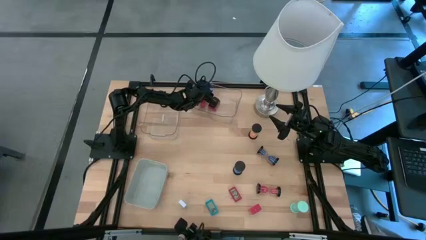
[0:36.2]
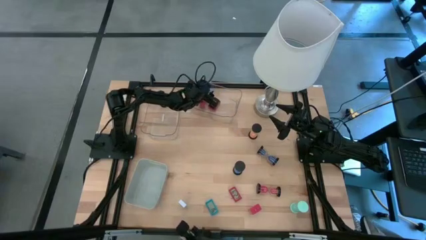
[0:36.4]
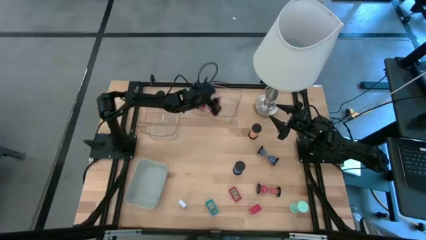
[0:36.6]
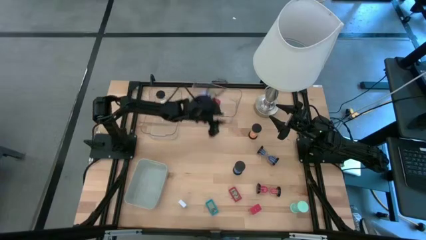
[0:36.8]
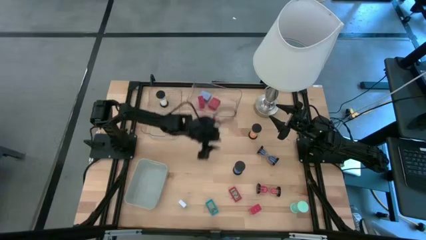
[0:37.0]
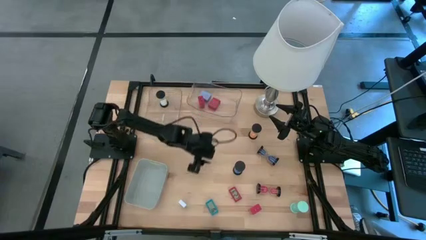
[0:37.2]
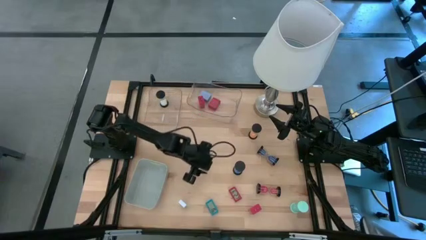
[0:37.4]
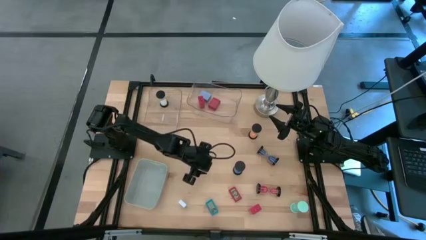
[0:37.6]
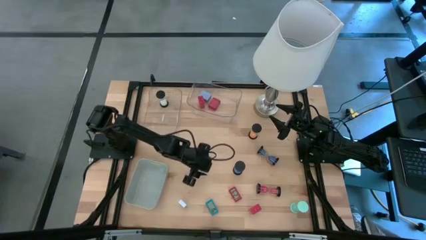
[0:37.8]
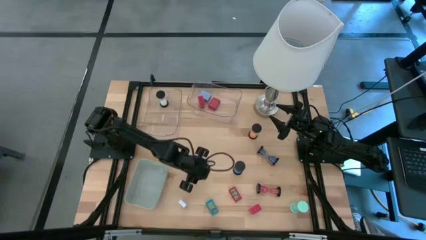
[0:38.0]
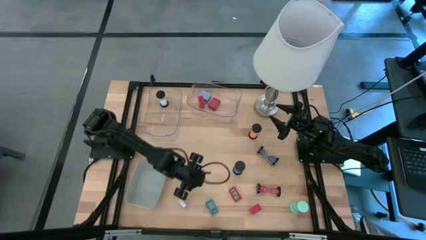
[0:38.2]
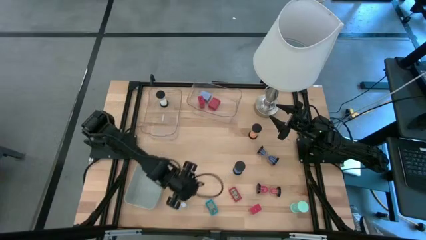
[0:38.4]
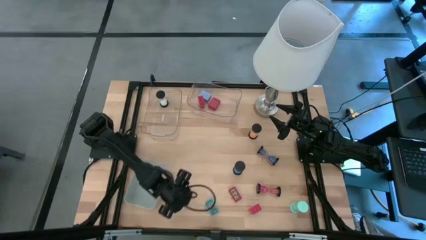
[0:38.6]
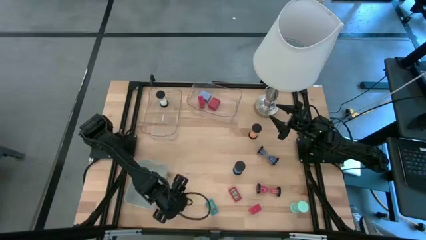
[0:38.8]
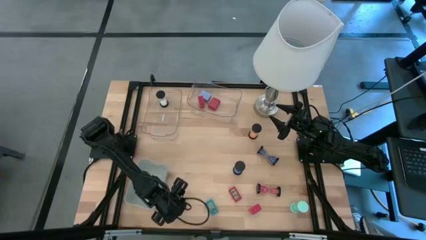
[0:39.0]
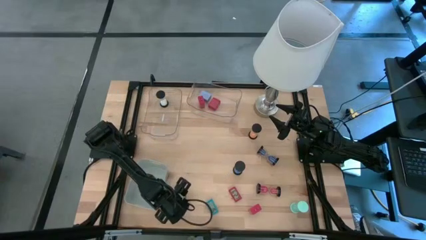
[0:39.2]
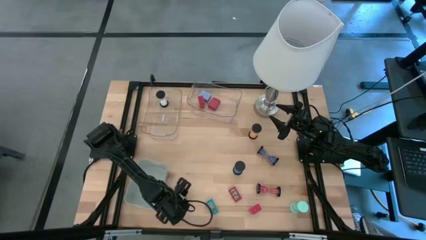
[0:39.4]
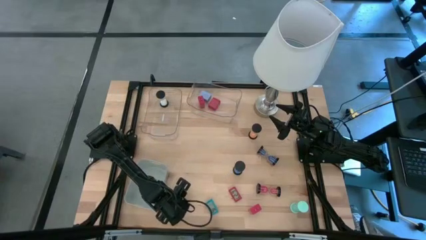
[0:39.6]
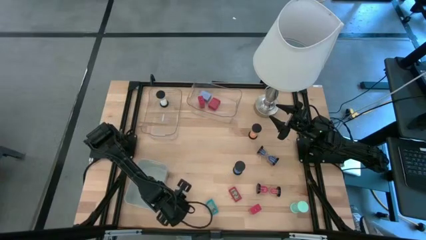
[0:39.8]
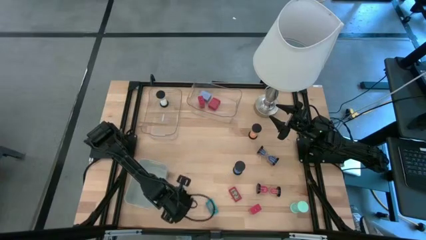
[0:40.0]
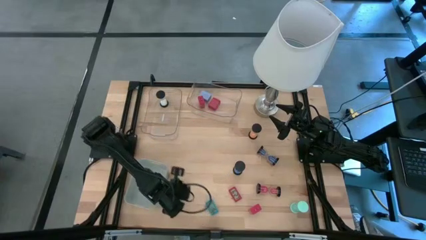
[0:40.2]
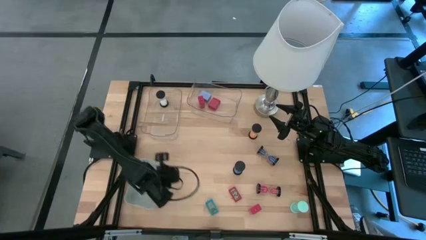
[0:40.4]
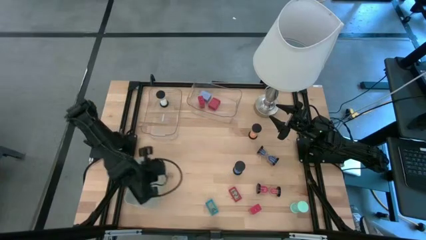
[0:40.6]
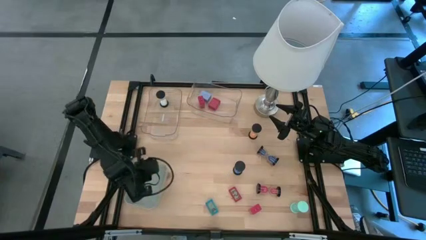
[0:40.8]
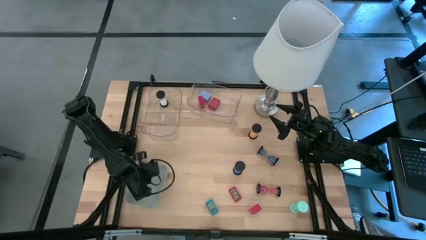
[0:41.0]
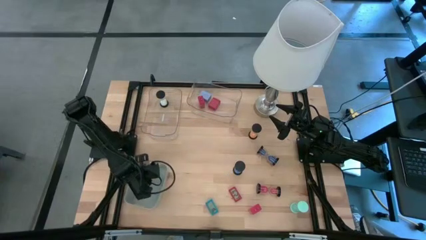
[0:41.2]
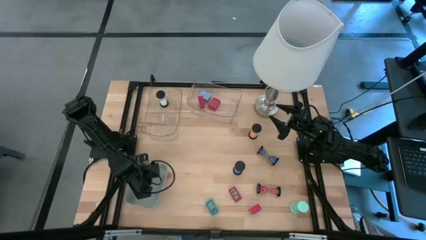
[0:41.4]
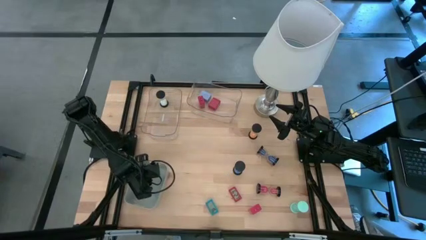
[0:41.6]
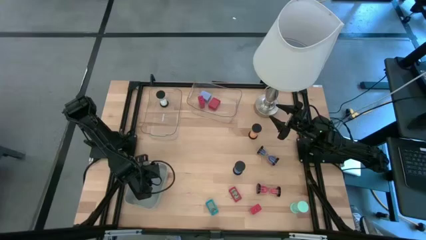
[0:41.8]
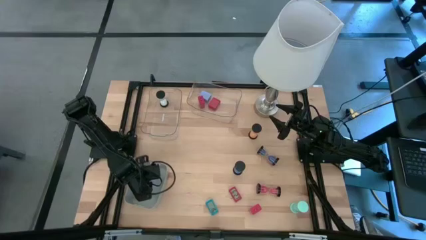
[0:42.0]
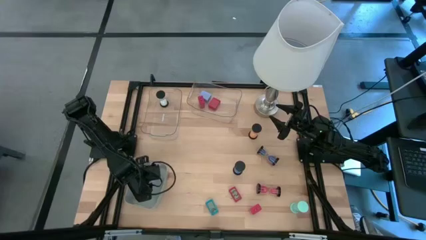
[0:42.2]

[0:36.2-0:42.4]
Task: Pick & Place Office items
Put the white digital clock timer into the gray bin

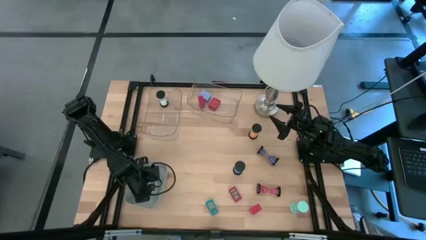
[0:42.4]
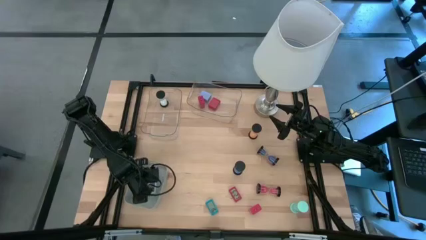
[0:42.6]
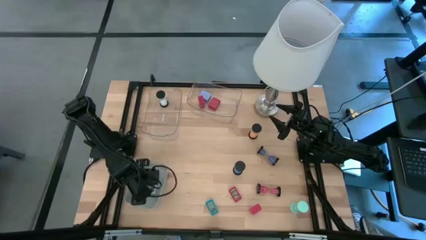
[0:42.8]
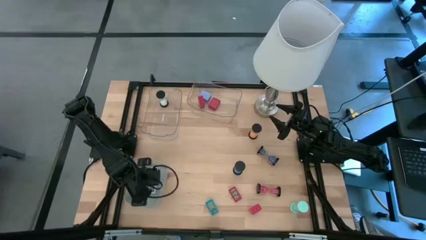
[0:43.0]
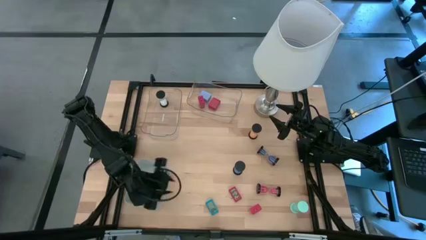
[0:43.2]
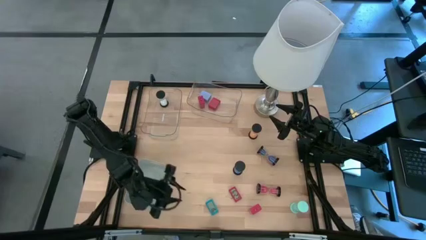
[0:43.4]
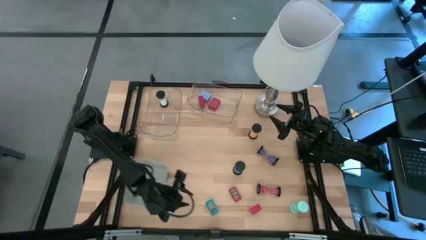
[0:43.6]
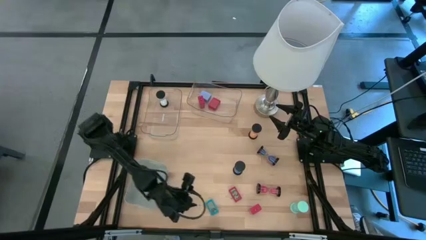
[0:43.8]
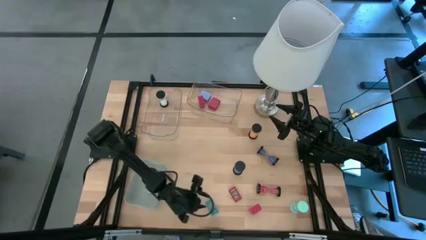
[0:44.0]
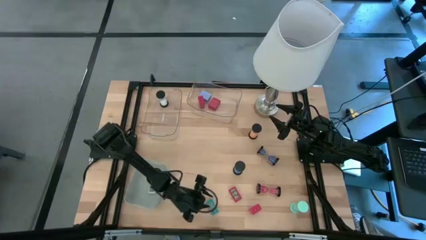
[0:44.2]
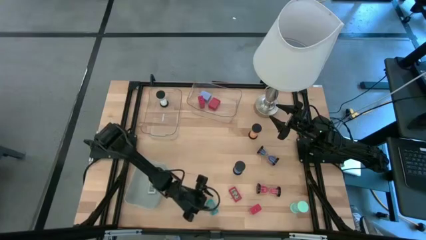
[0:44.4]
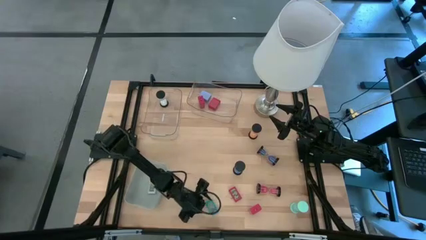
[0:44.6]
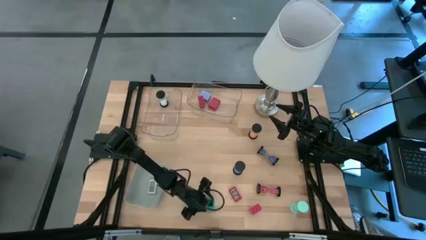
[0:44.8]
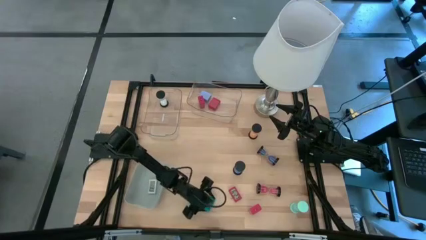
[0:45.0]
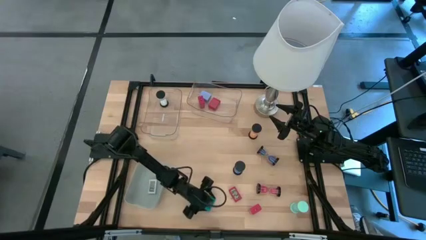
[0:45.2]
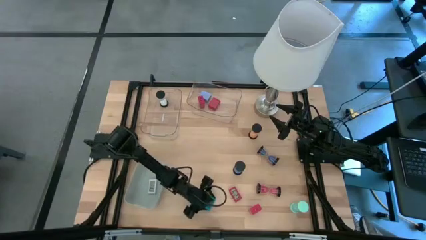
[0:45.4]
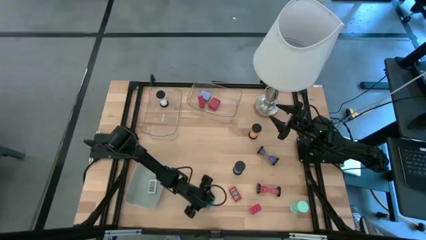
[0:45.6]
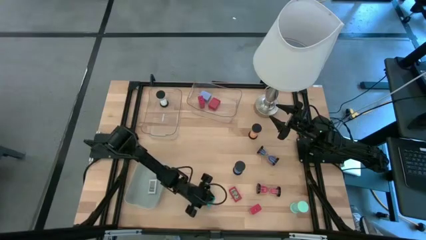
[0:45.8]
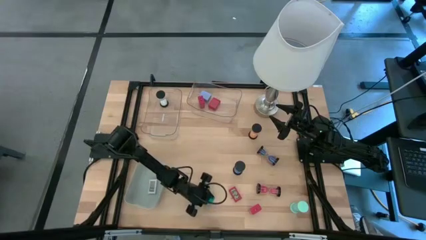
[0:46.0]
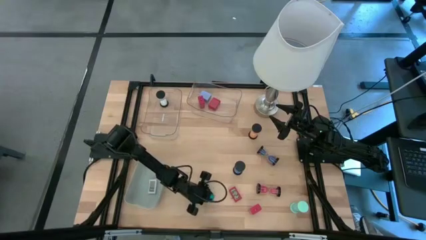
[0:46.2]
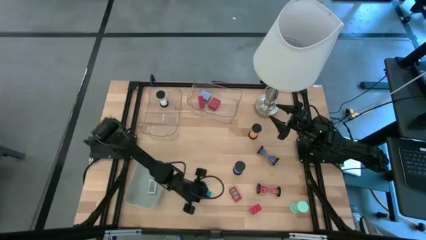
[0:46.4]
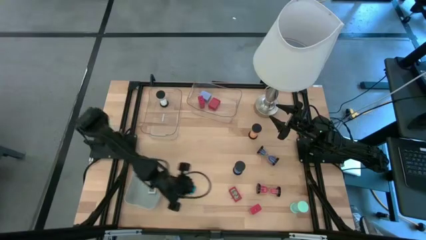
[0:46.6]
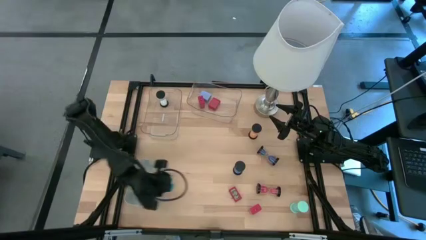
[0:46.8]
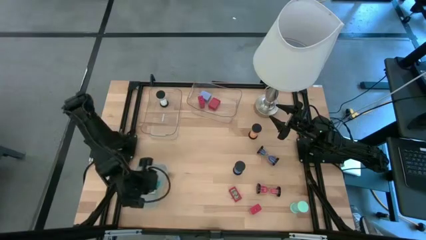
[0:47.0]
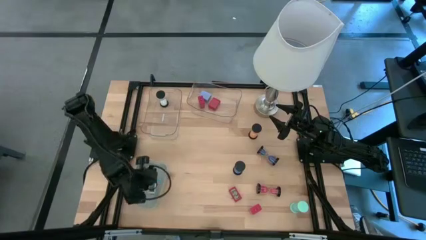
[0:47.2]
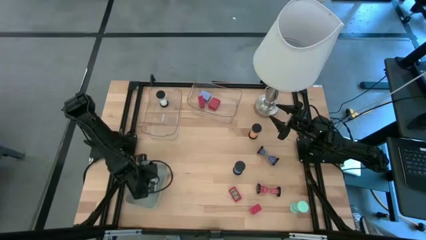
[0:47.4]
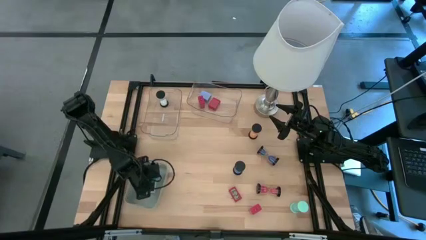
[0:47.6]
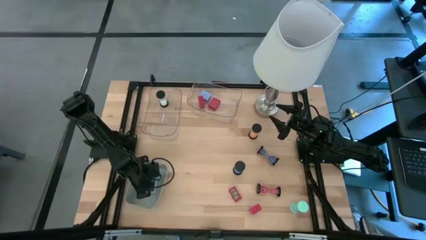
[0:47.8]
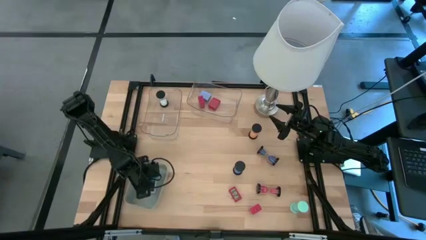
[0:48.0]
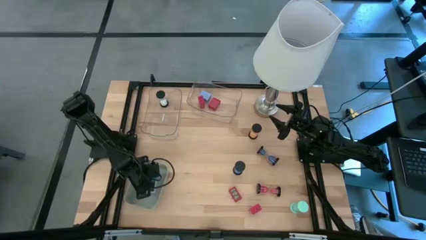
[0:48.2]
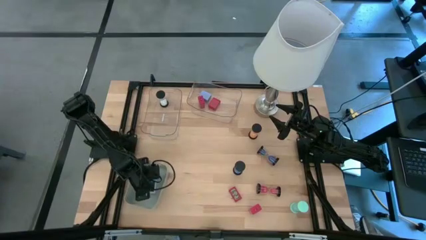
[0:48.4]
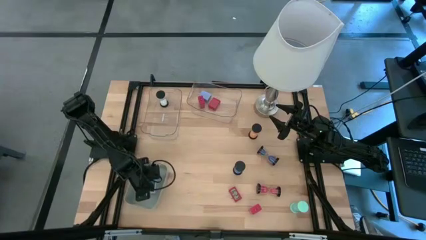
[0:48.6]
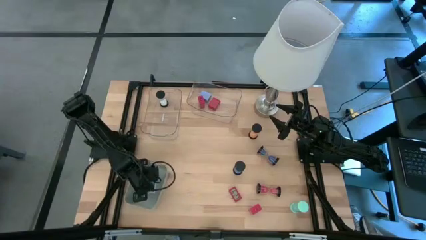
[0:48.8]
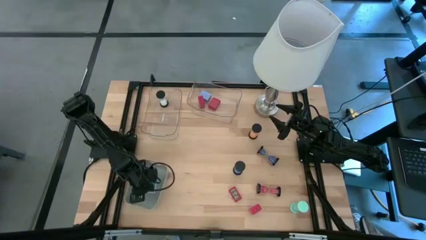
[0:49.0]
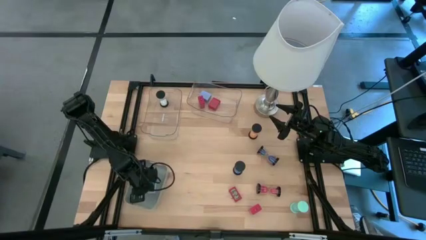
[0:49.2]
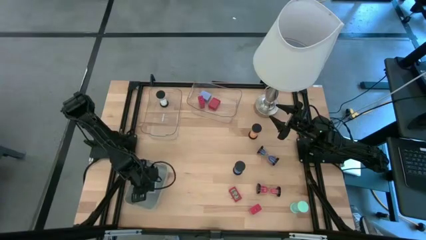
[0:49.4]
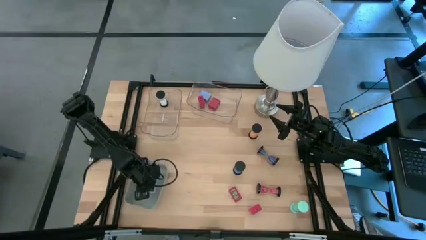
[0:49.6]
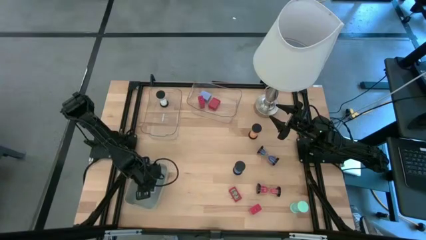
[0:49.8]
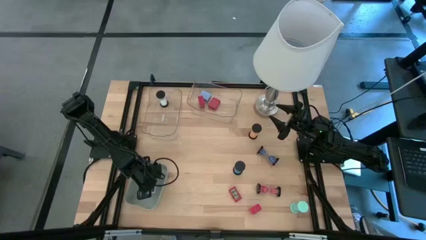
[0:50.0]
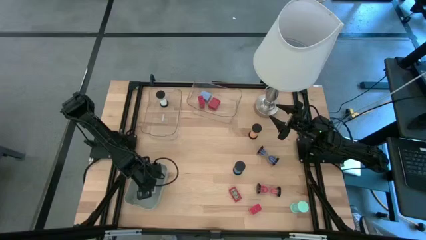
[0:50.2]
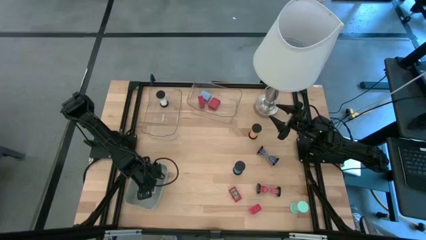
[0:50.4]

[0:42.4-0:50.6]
Put the blue digital timer into the gray bin

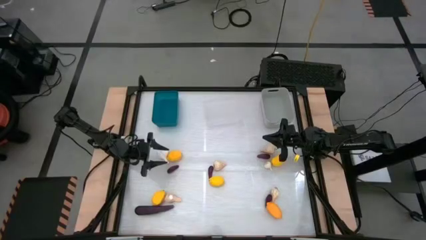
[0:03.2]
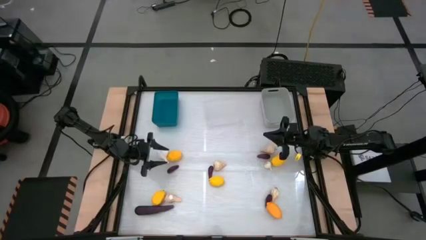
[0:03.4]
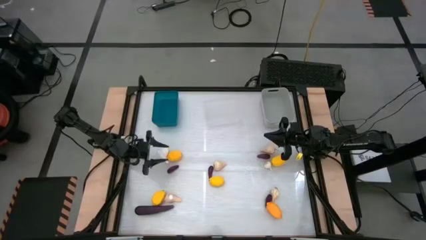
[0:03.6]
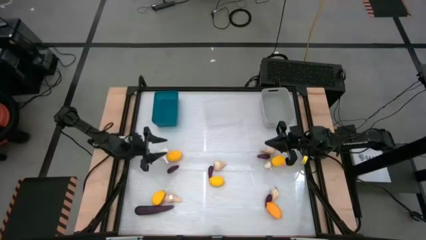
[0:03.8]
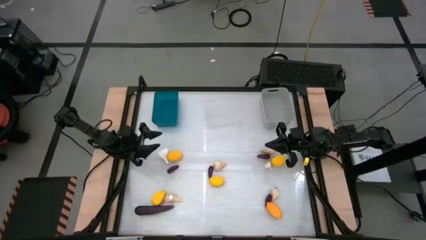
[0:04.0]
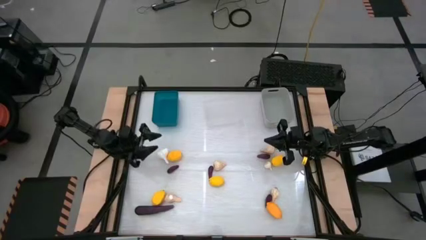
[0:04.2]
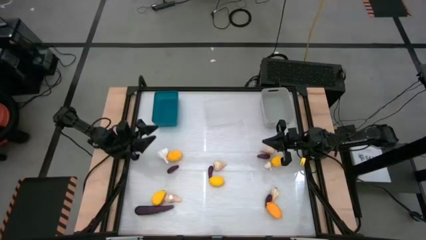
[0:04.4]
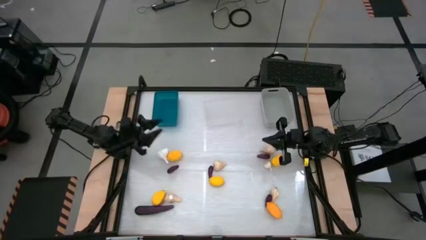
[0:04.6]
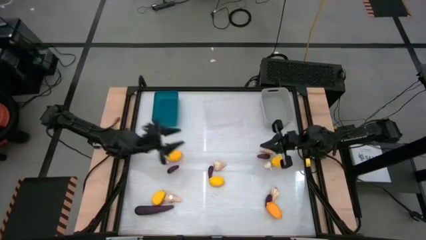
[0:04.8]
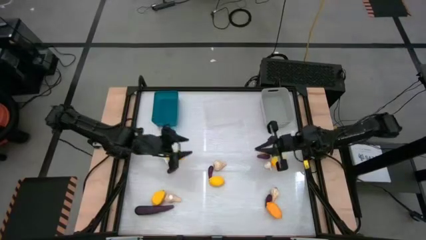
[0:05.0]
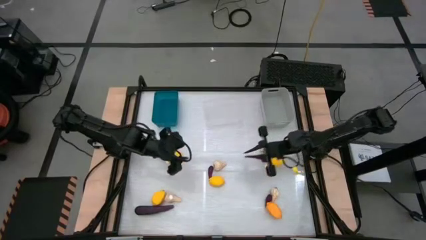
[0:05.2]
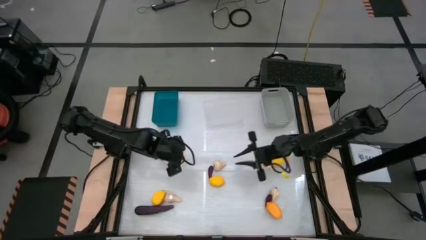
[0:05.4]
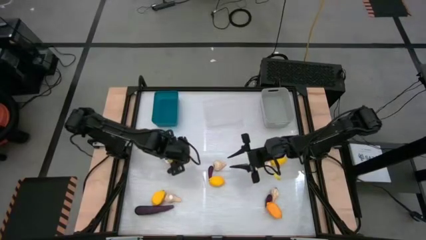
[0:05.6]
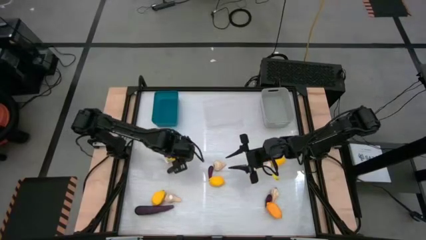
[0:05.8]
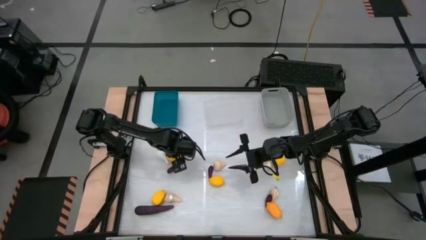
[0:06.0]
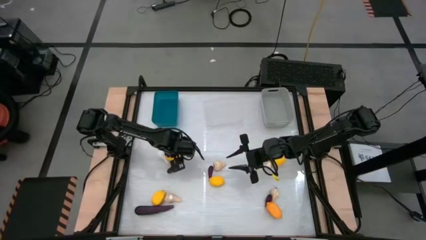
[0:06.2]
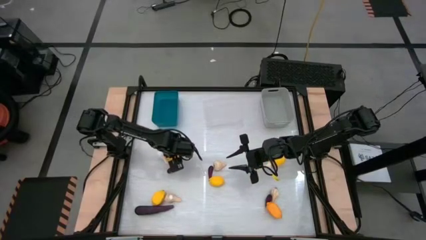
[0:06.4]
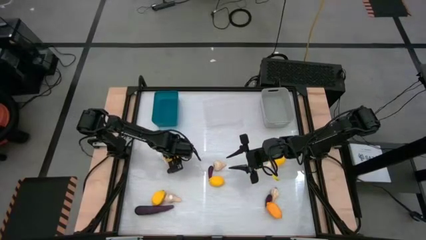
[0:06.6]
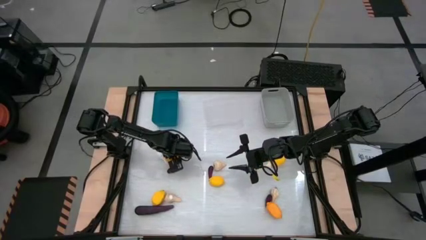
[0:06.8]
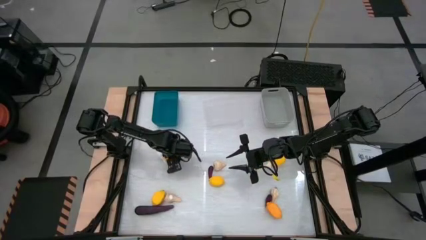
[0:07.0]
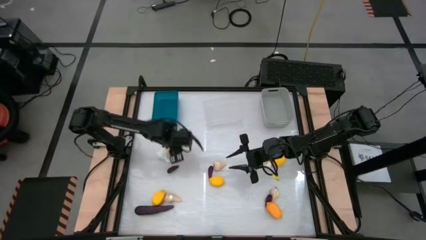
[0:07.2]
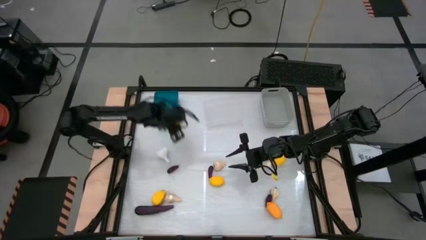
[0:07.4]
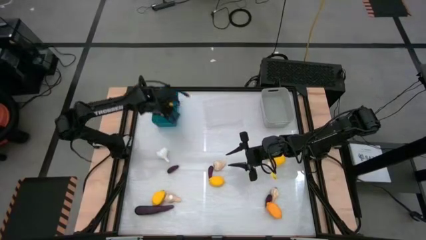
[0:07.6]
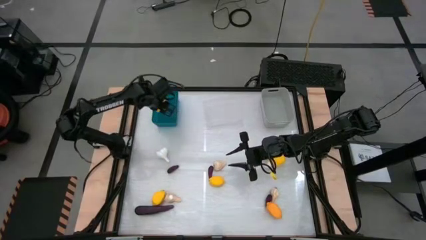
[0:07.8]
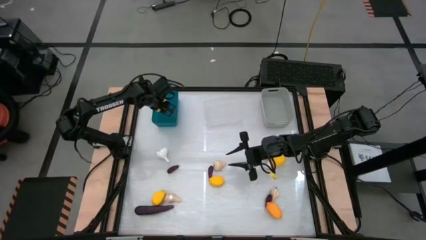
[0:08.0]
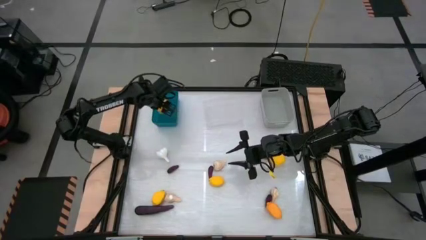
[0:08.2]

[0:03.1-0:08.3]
Task: Sort produce into baskets
Put the left lemon into the blue bin
